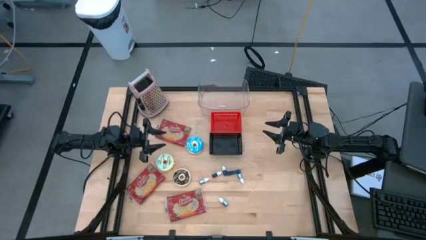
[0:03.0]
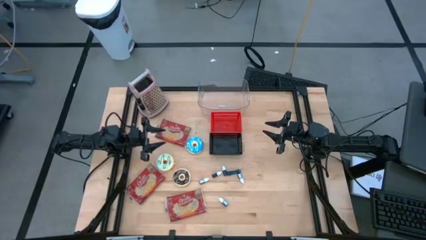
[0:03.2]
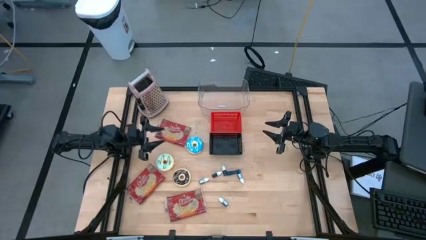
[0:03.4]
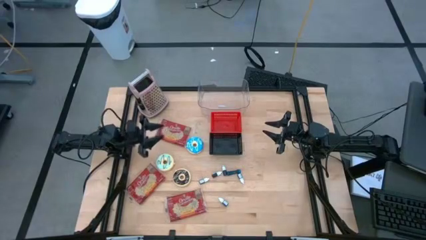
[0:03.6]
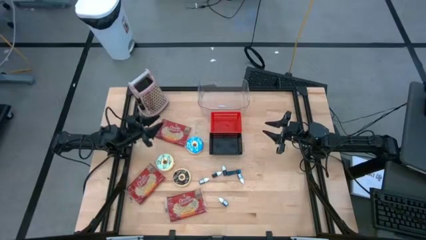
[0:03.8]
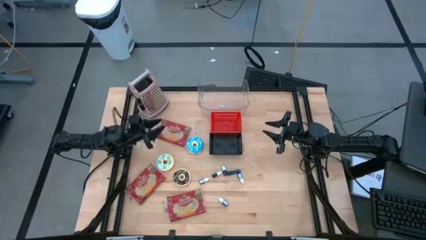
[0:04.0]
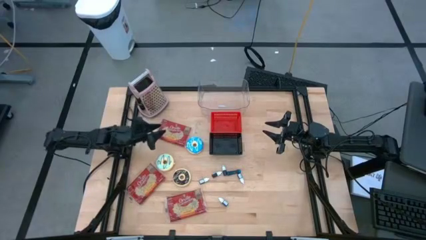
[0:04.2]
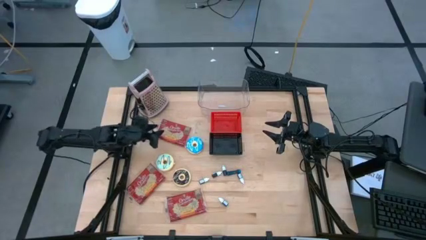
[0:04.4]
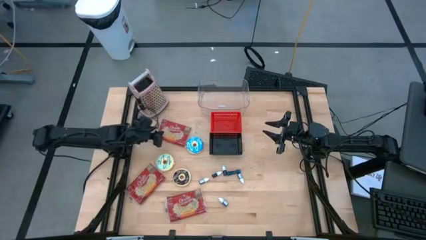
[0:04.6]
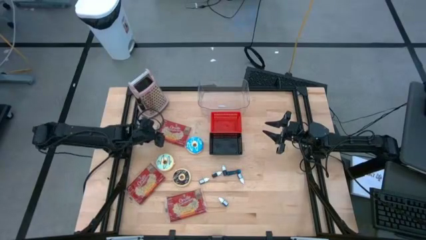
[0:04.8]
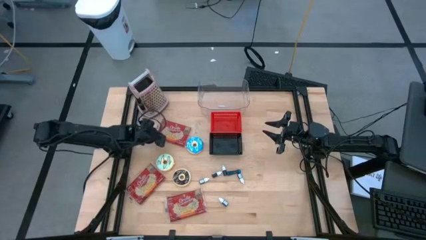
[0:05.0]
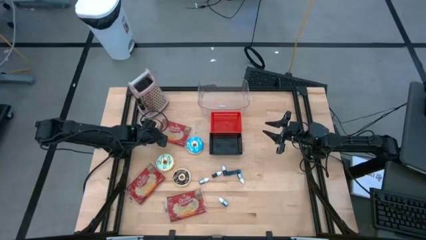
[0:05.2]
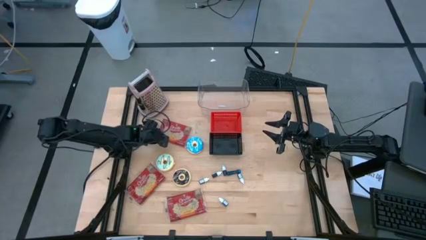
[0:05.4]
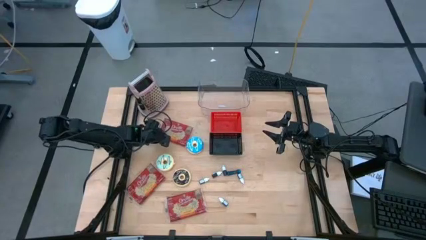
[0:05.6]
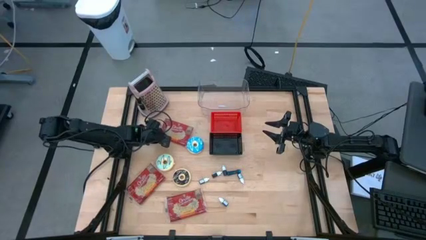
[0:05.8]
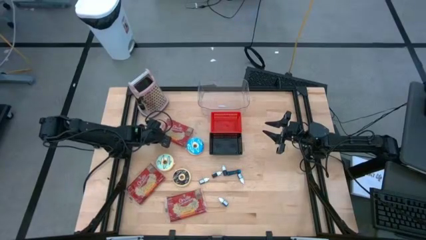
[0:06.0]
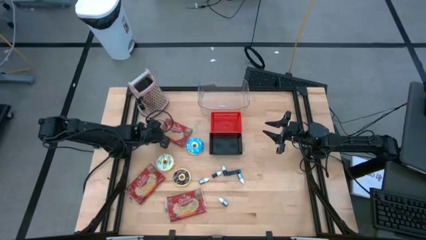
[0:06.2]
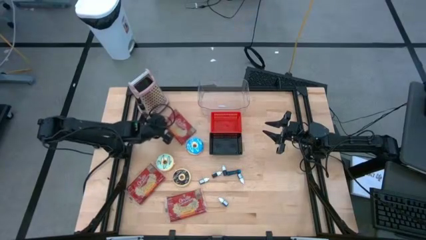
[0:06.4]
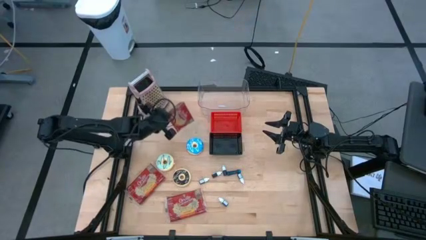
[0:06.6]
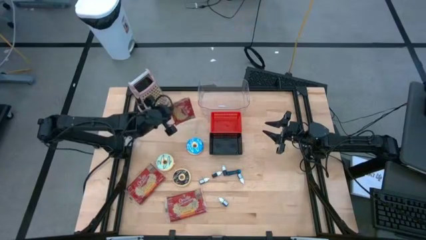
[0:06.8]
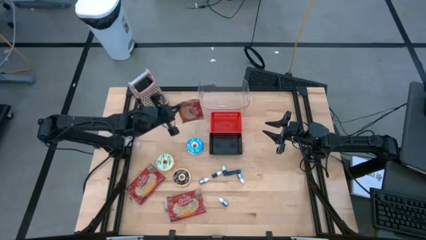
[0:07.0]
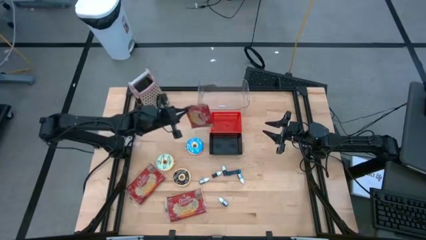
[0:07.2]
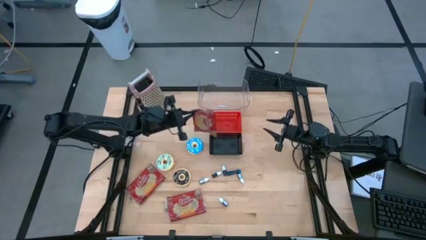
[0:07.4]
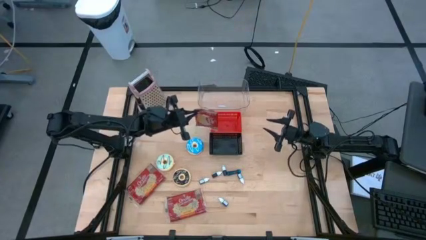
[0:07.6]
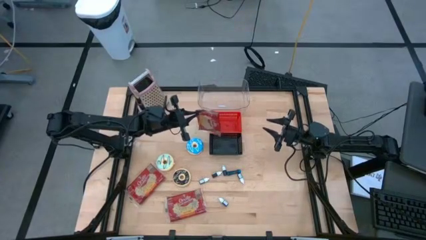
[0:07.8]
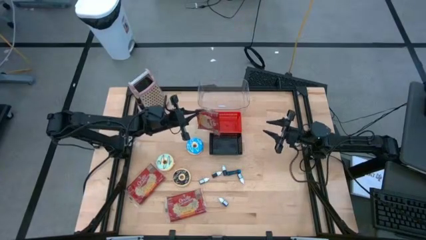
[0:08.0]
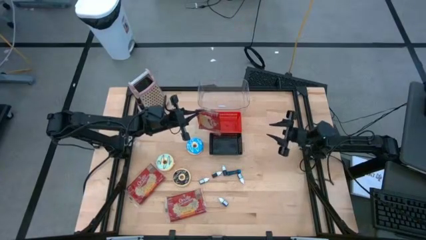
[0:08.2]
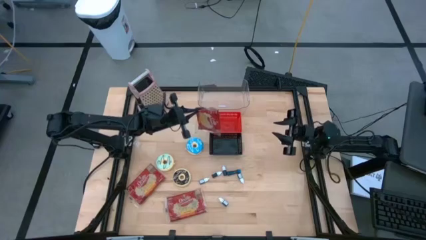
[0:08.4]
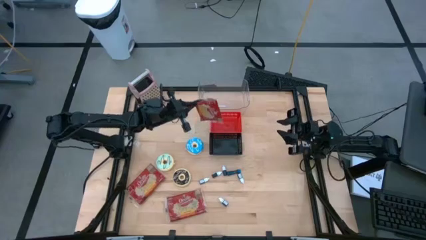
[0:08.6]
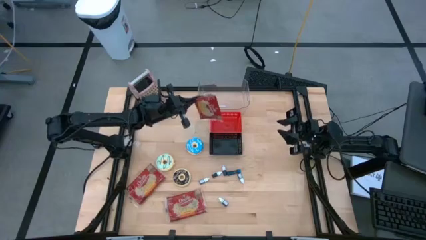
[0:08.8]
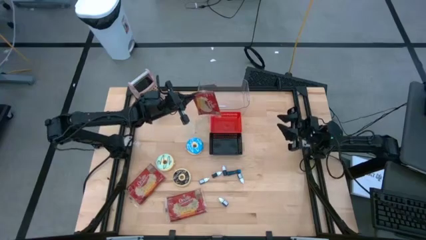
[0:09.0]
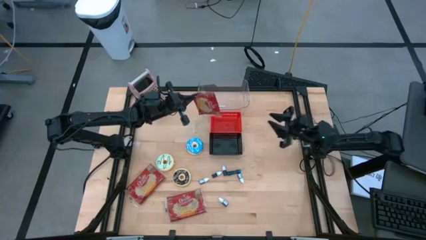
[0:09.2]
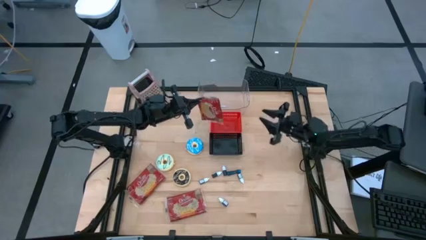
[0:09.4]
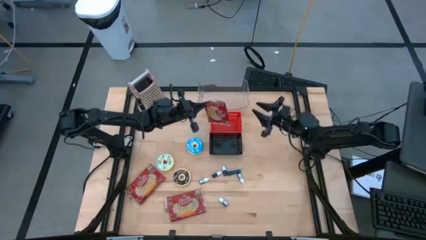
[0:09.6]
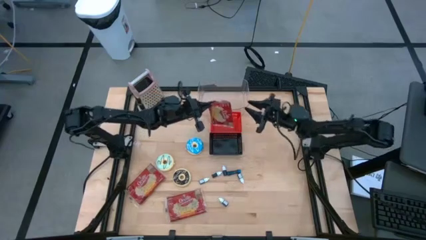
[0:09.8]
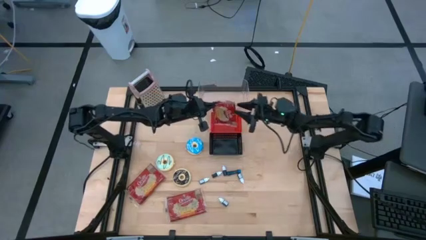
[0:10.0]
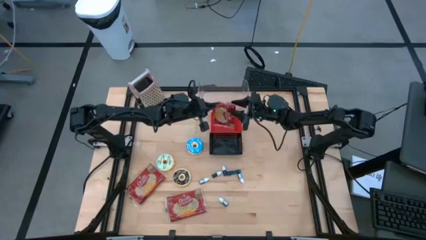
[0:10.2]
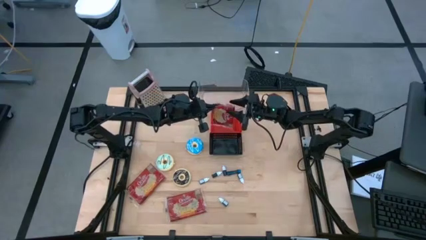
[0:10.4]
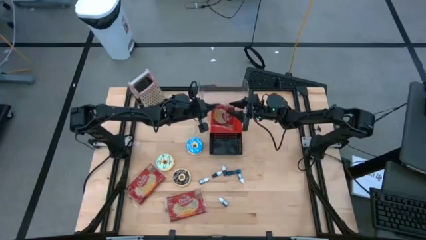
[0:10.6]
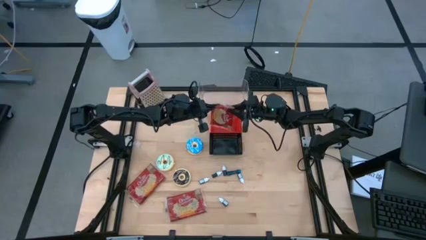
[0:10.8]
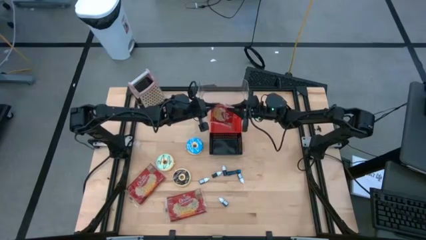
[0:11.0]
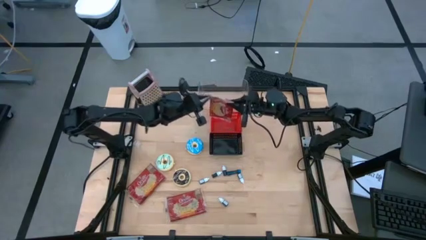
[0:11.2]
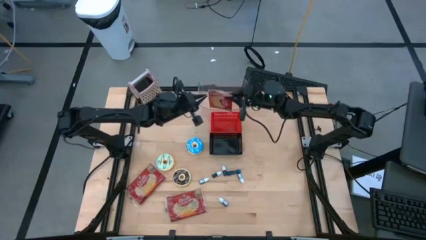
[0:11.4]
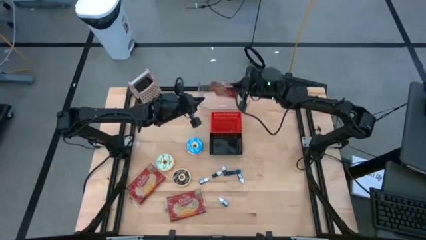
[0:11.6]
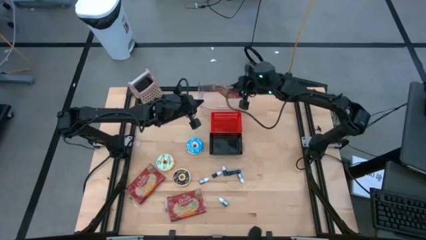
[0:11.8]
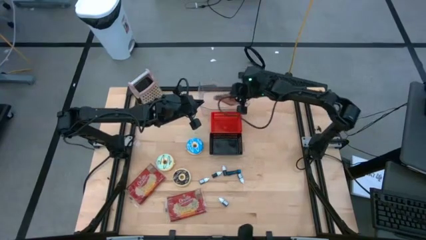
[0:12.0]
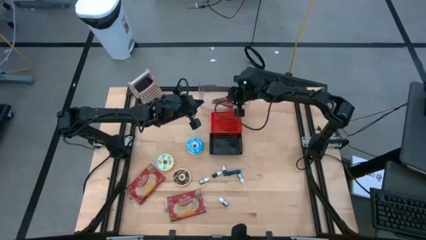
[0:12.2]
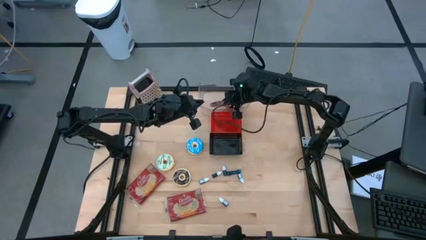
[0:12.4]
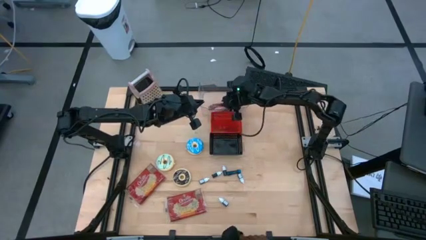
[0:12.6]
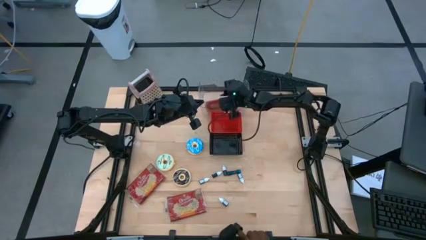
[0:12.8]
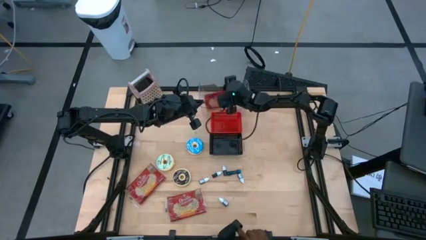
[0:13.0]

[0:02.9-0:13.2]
Put the top popcorn pack into the transparent bin
